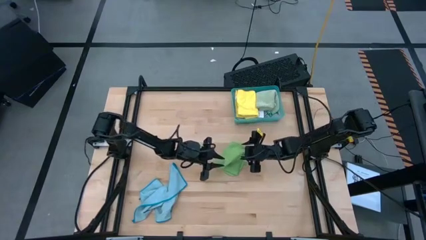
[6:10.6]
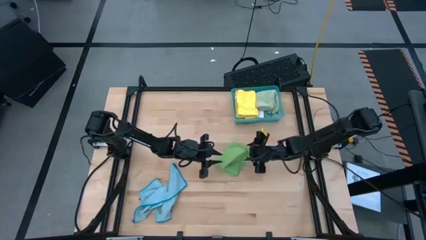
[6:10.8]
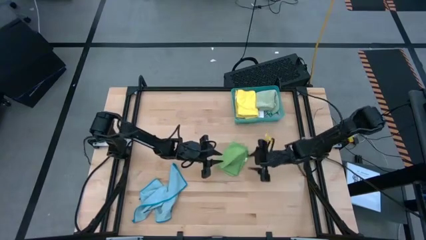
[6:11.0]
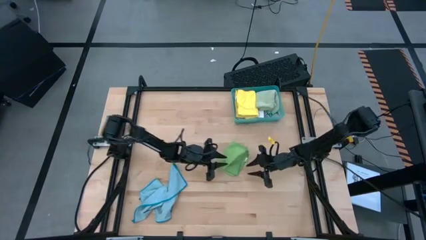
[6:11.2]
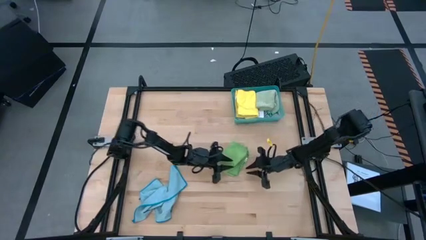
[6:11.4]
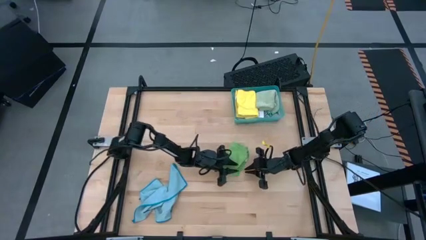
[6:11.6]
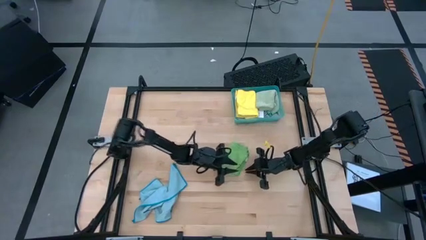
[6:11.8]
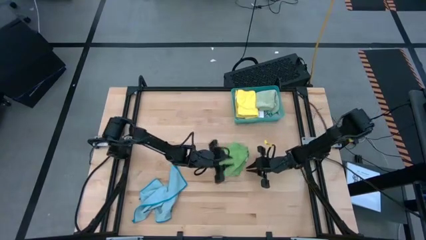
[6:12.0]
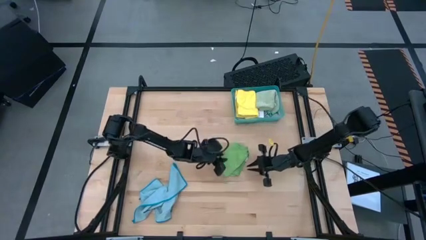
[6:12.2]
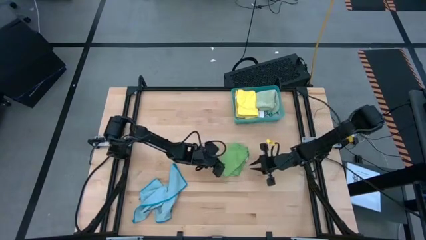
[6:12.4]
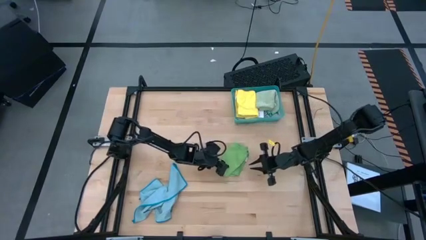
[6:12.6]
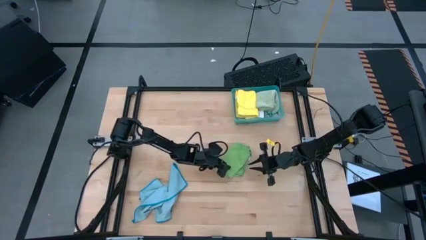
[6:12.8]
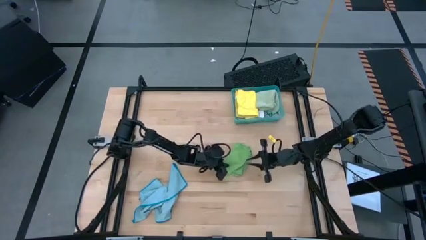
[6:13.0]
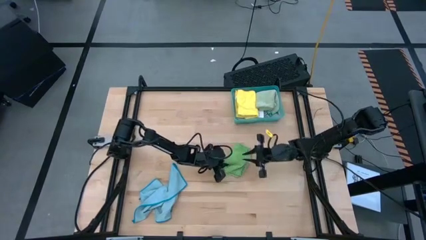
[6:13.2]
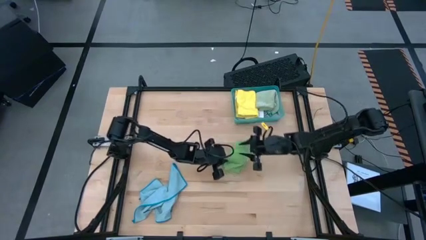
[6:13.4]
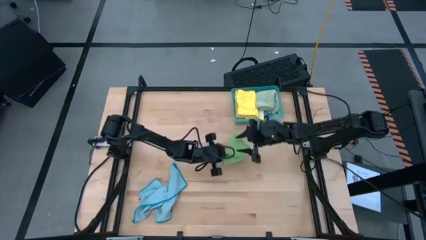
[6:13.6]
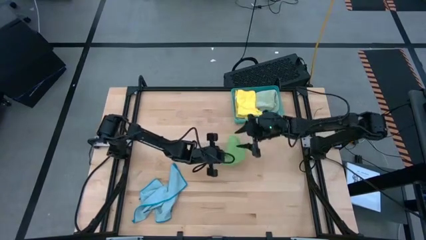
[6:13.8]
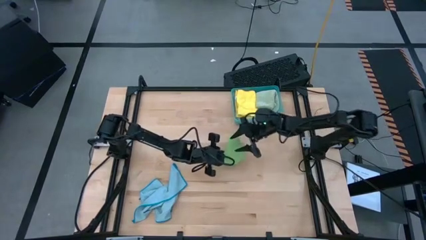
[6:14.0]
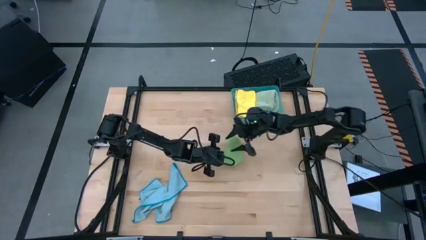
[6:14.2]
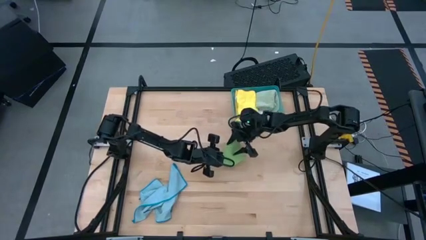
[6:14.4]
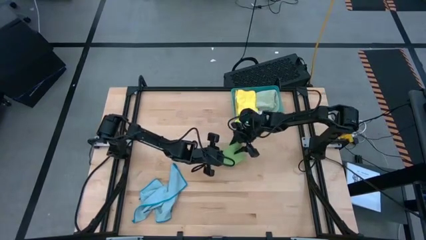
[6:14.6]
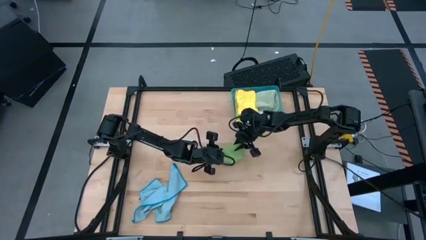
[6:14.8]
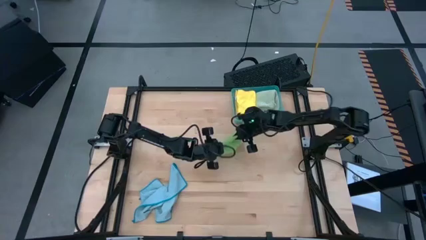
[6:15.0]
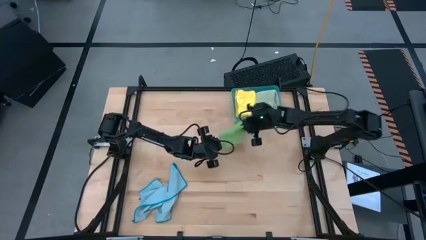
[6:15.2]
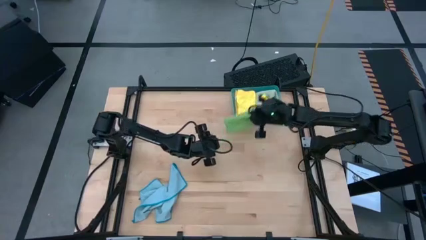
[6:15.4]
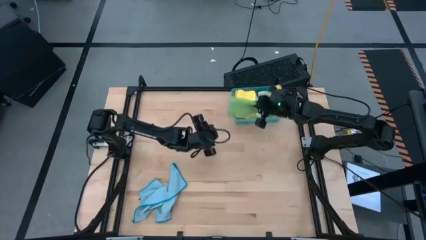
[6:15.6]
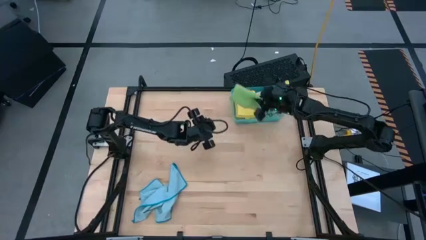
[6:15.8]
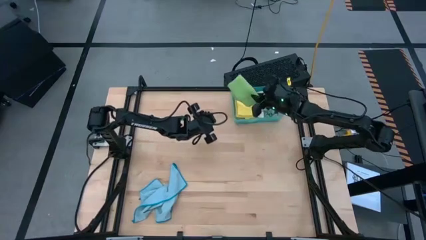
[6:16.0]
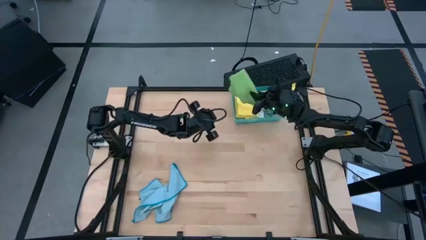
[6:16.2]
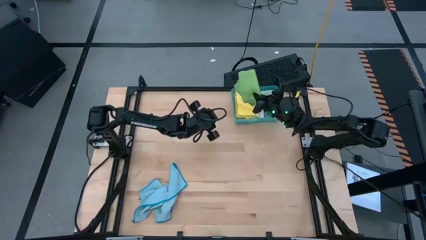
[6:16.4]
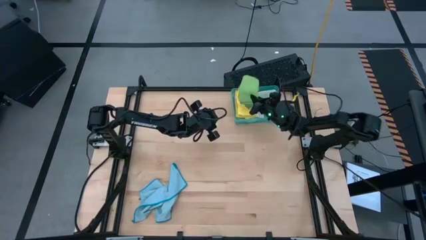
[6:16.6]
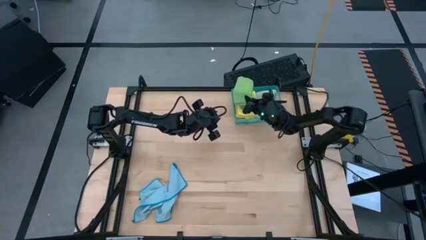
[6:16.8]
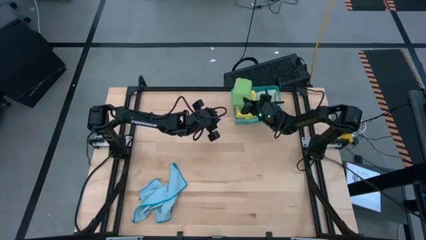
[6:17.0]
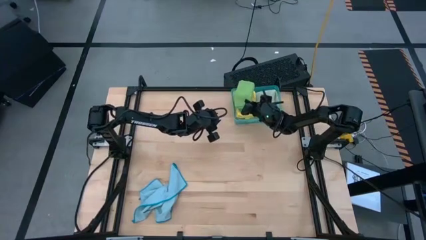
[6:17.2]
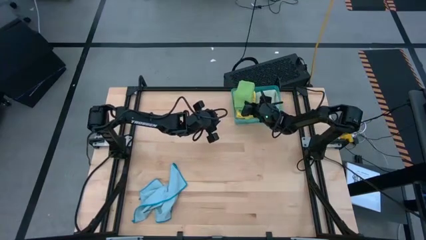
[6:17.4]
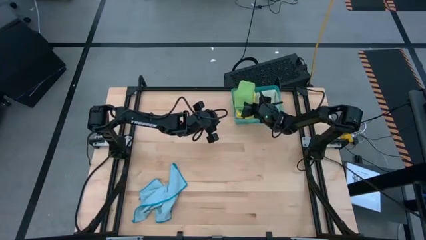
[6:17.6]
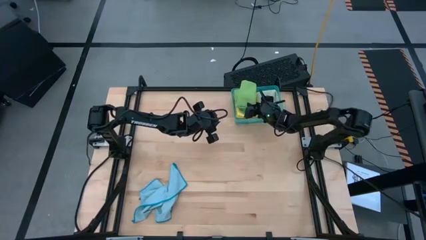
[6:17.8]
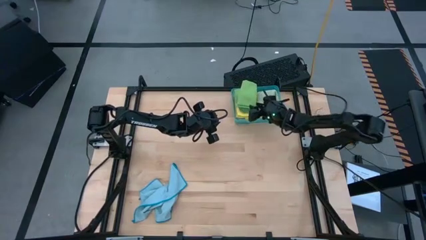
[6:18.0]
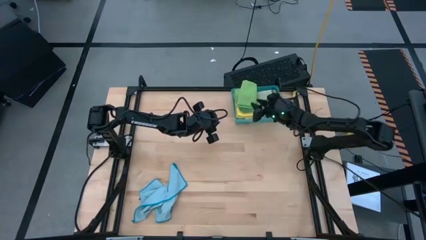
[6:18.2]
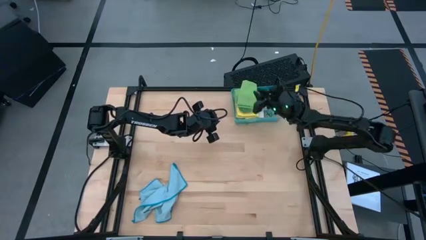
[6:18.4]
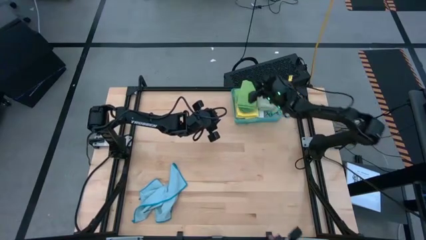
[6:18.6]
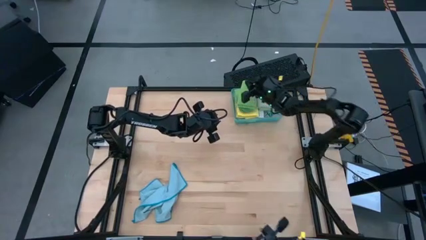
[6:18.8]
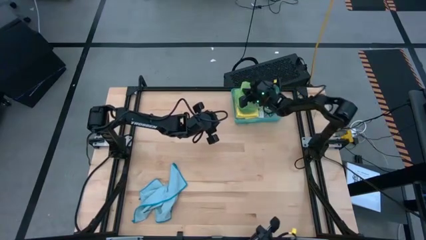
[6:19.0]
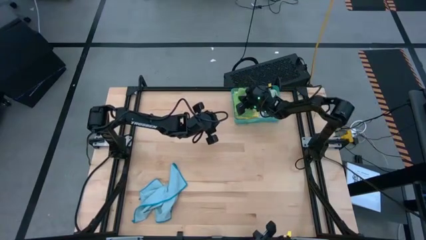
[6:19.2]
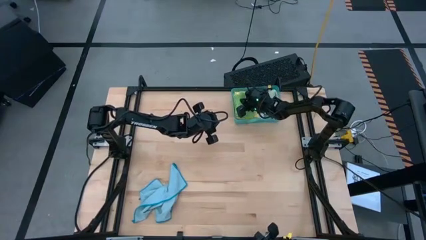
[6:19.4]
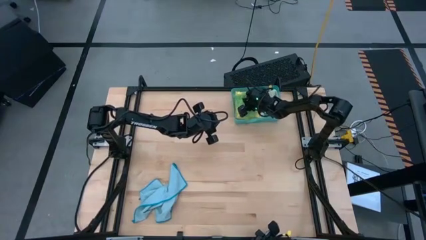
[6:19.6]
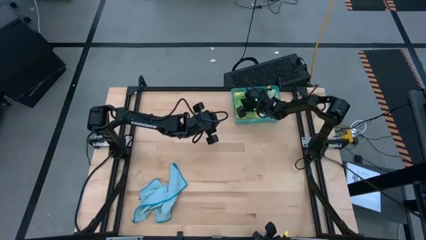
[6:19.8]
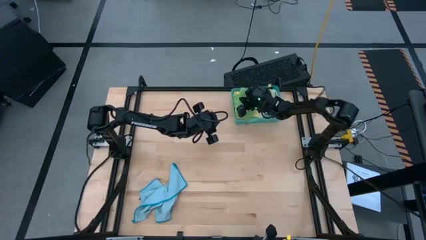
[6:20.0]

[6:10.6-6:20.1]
Task: Fold microfiber towels
Put the folded green microfiber cloth into the bin

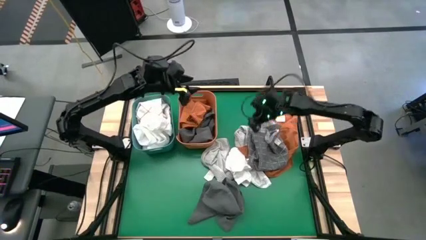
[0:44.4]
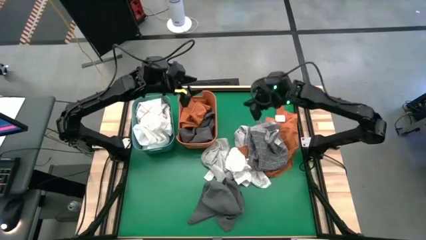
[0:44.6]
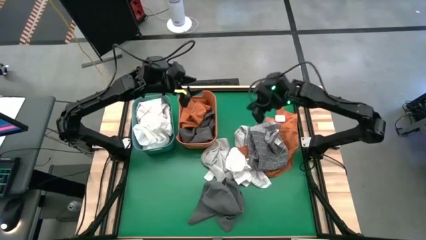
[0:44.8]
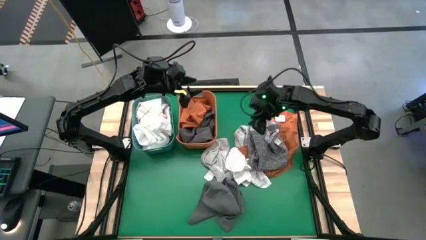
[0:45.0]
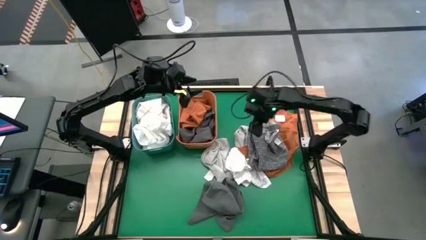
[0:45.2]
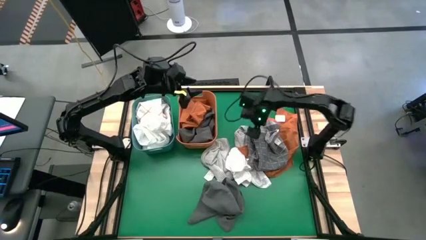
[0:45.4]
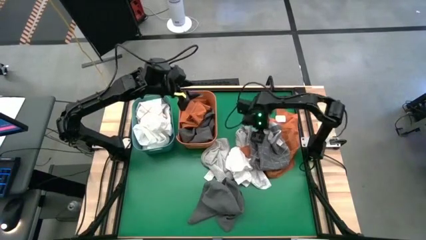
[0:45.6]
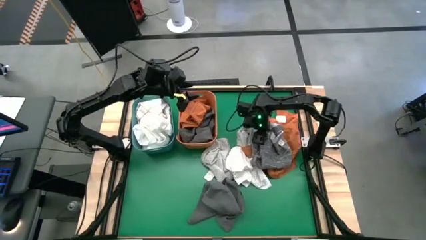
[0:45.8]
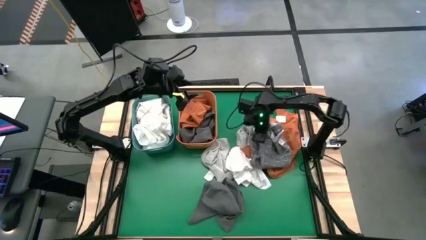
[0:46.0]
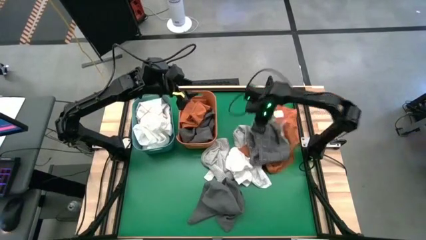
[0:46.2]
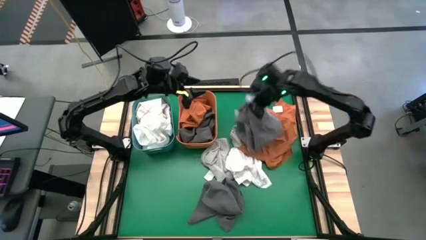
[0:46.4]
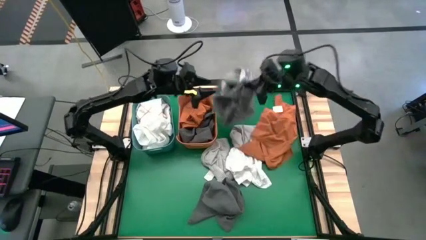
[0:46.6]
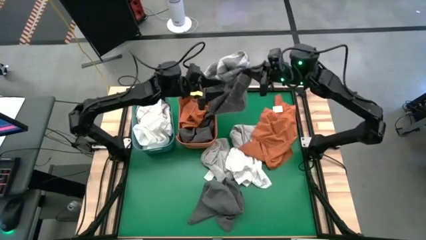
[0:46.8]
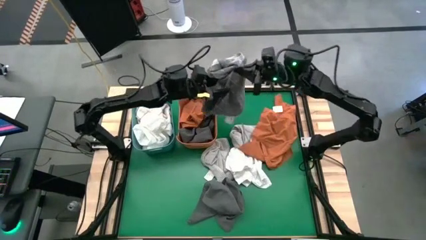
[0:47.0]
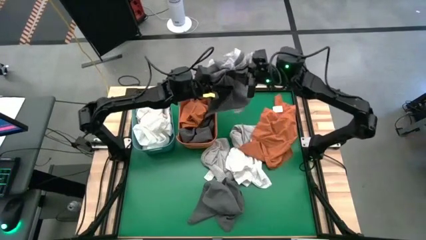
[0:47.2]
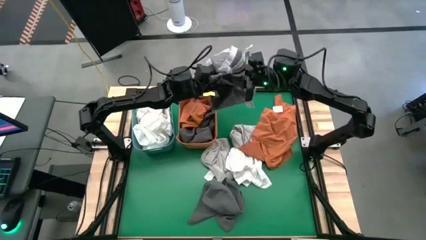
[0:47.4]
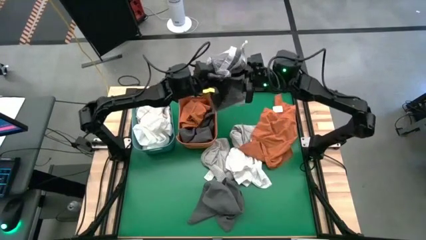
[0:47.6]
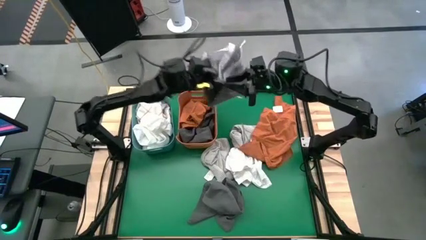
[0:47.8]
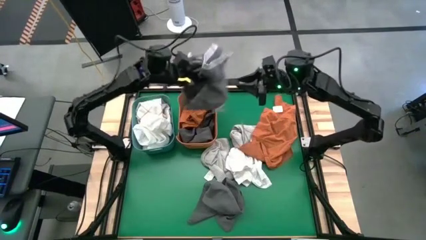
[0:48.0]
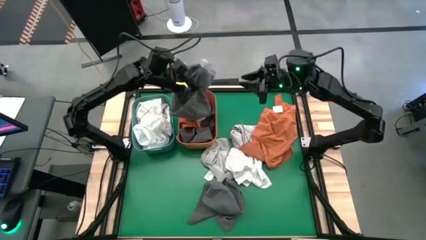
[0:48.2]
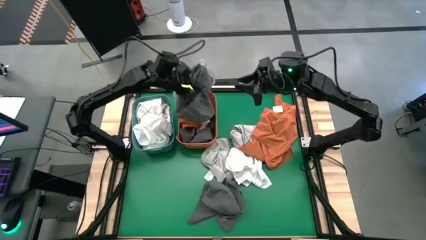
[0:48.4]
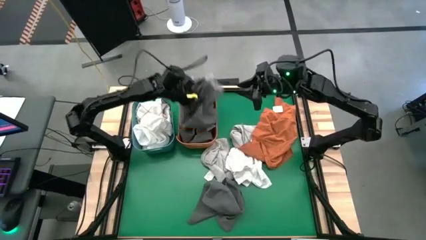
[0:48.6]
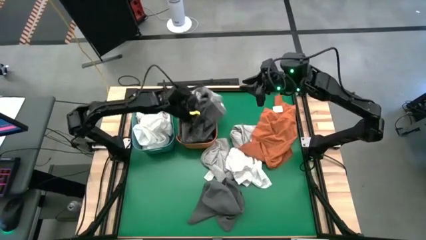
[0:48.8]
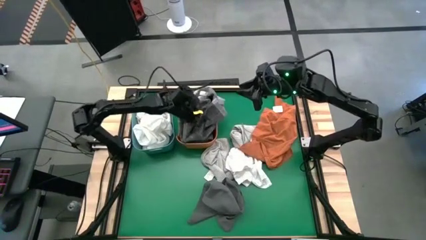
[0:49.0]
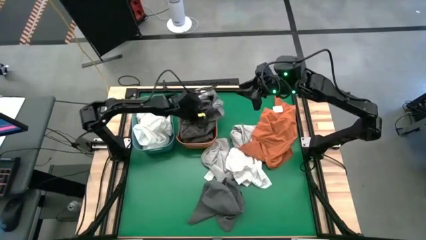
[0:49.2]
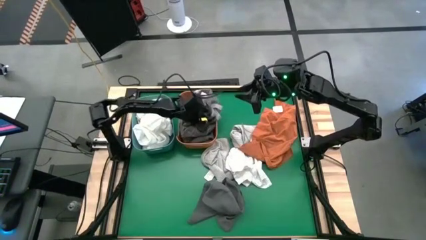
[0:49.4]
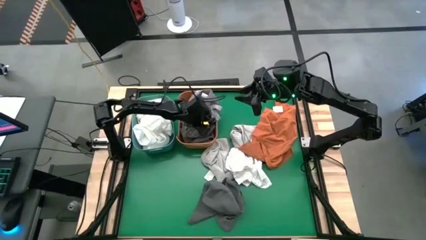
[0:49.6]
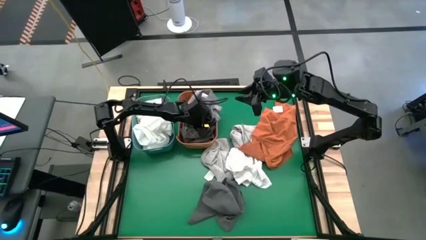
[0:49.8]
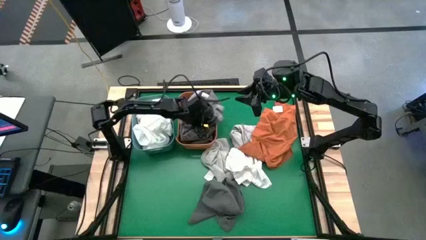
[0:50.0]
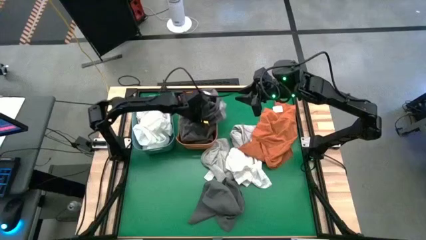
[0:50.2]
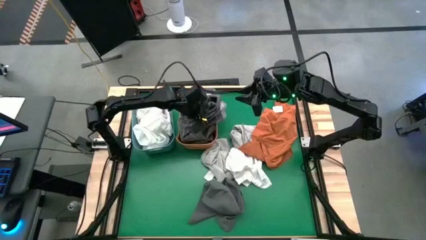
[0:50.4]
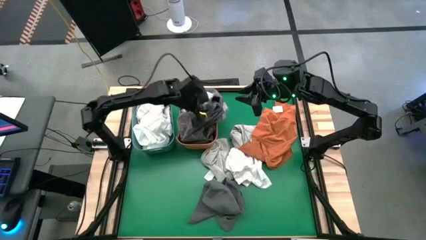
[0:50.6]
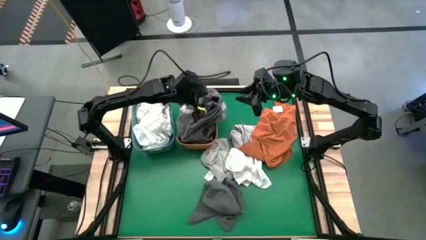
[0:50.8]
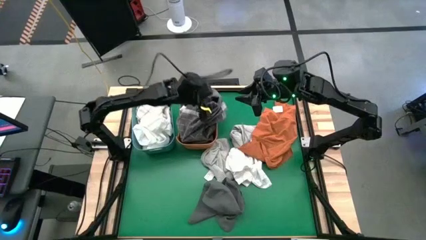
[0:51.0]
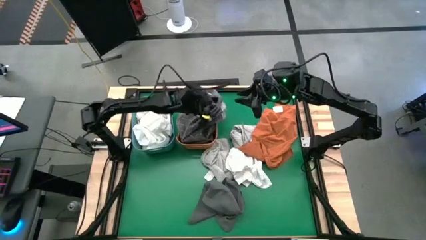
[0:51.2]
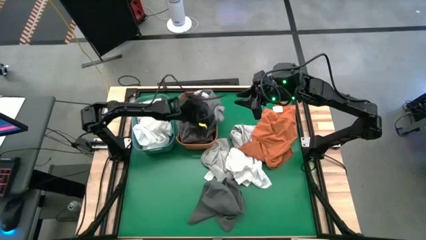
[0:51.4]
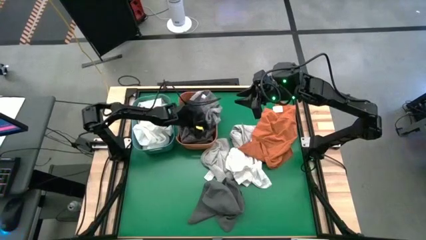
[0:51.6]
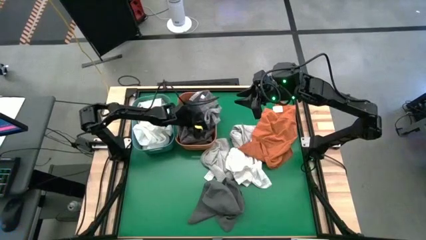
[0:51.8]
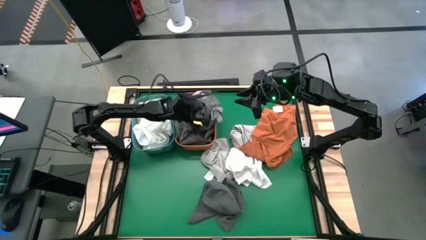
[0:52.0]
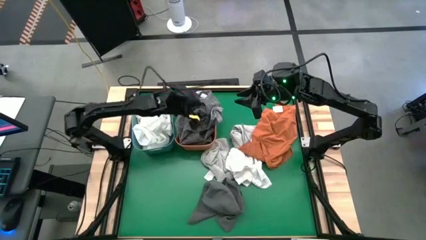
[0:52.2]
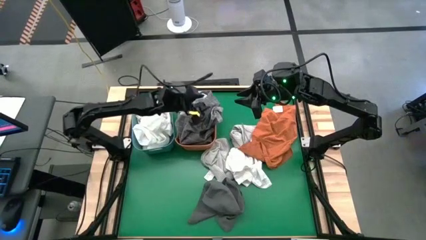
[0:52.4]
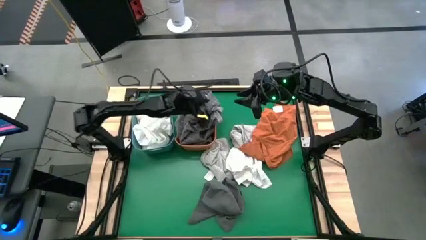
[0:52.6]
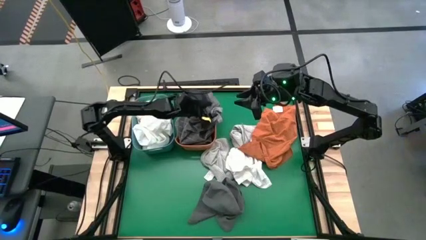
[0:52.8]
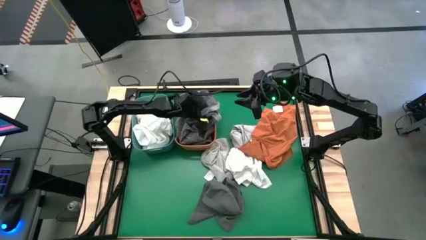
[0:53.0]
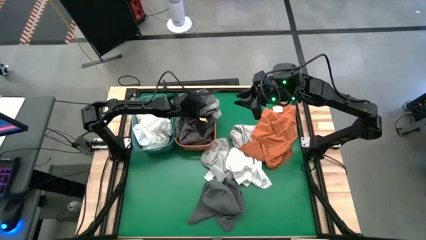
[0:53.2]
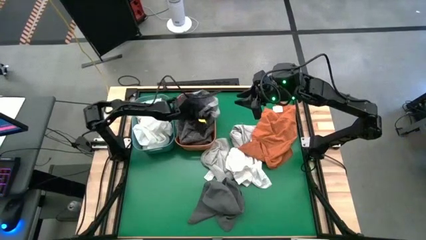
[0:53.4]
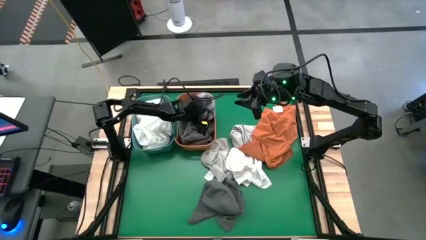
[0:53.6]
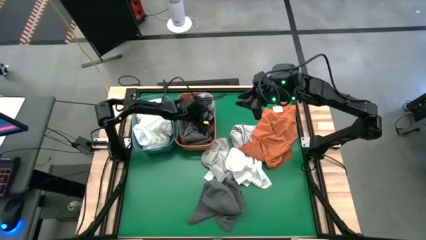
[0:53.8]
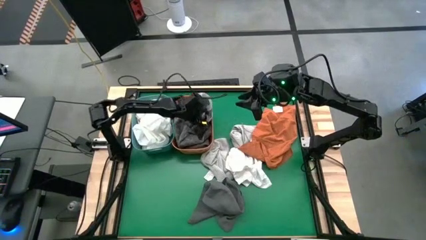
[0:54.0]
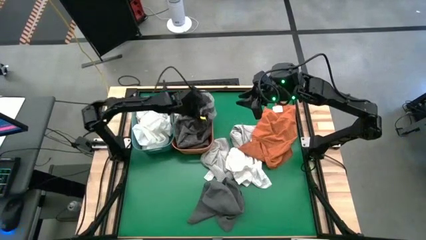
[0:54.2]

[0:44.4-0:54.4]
Task: Sort towels by color in basket
Put the gray/white towel into the orange bin
